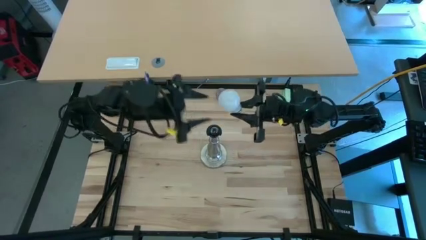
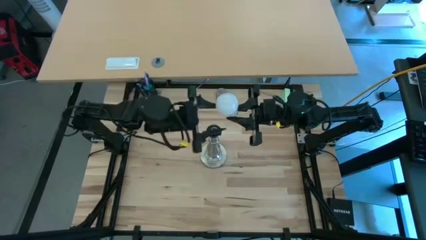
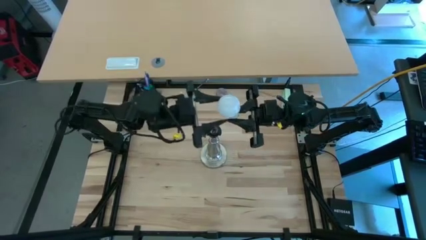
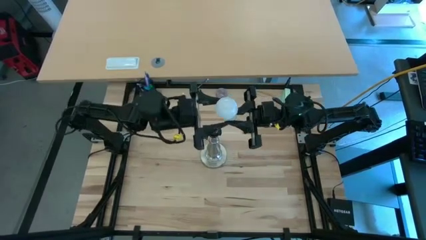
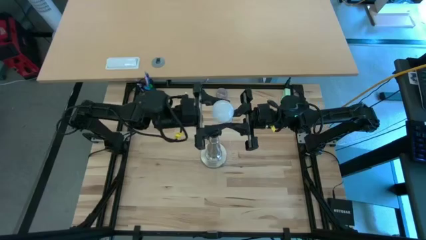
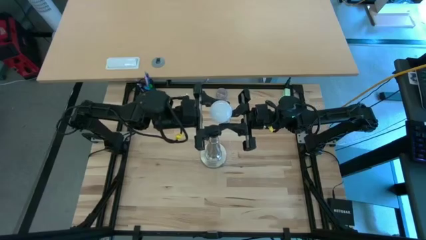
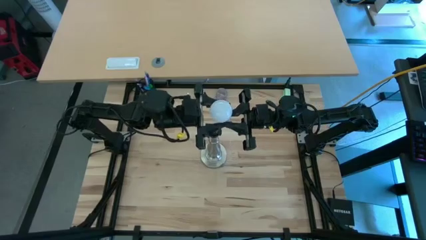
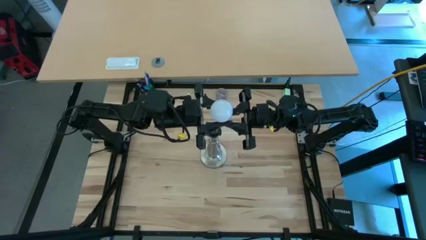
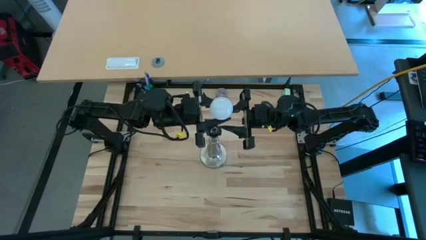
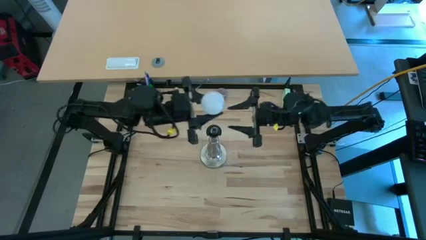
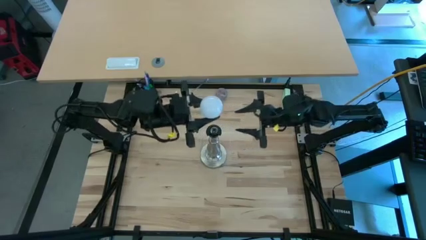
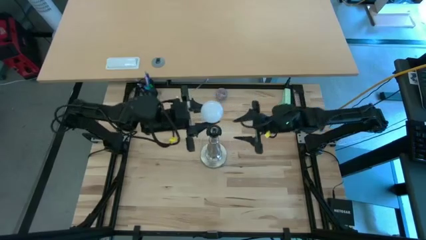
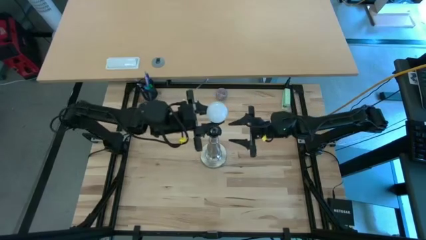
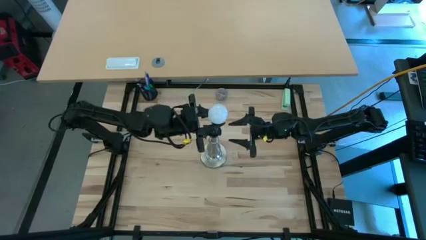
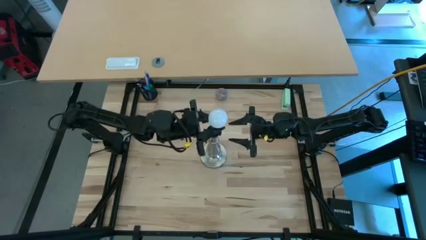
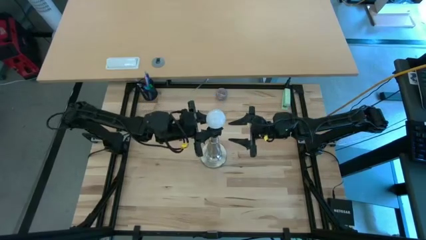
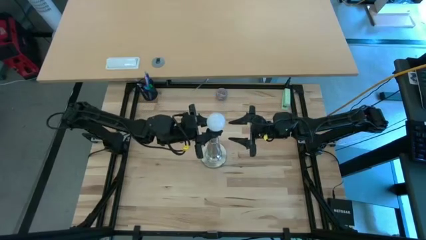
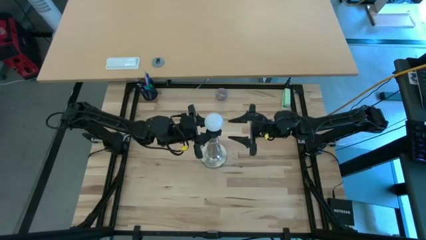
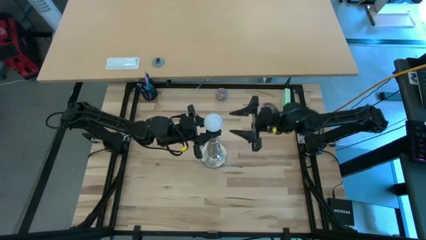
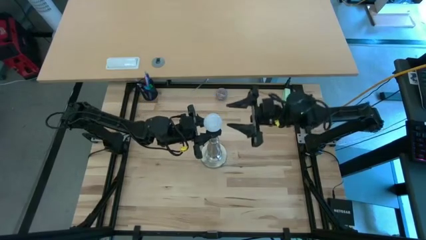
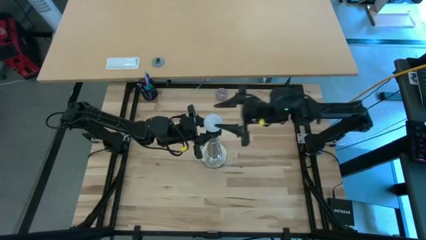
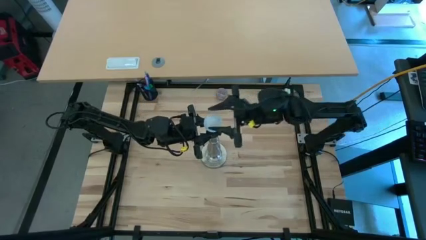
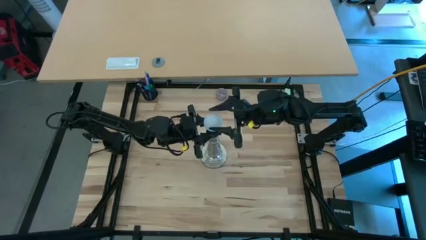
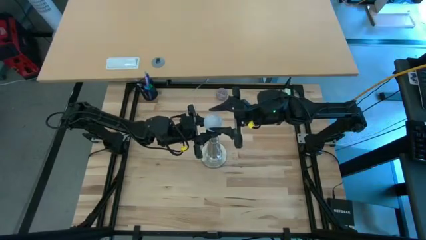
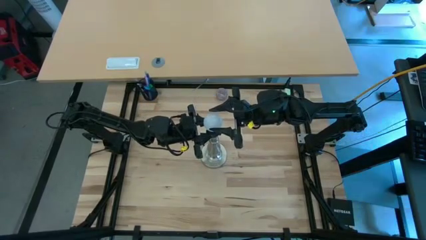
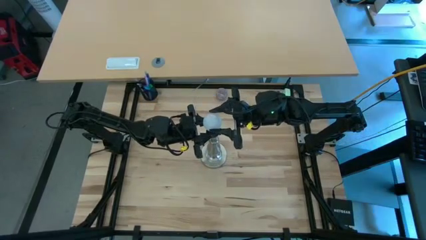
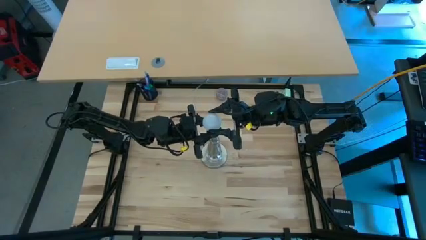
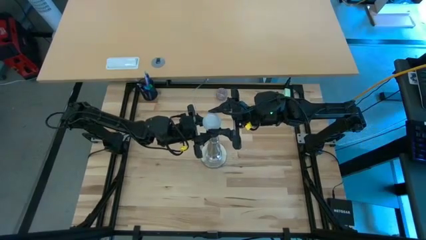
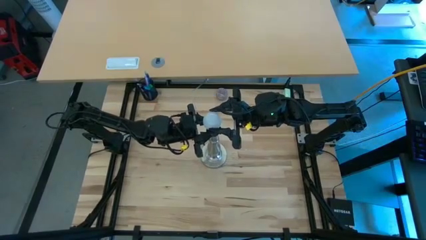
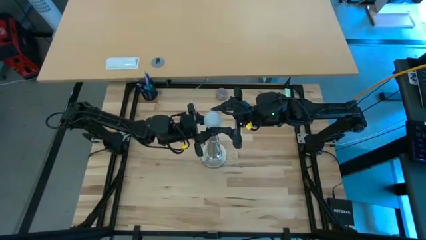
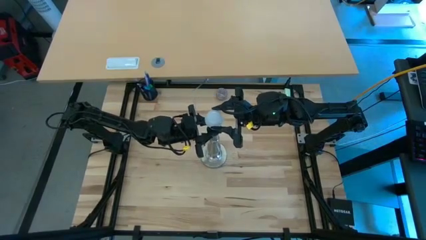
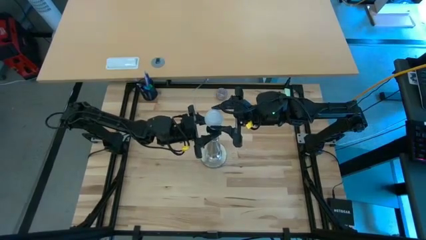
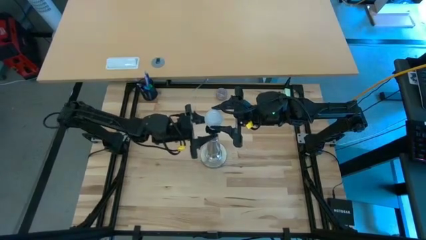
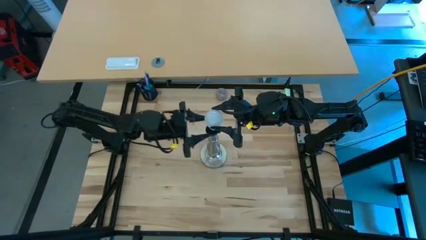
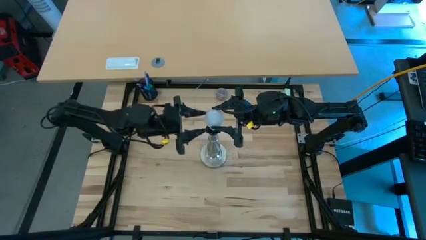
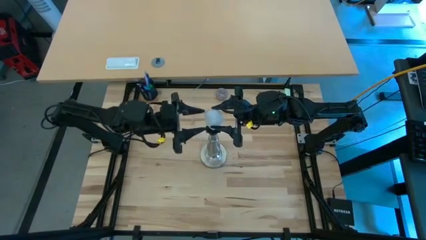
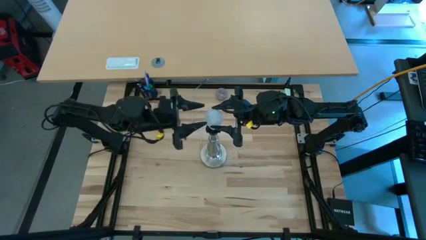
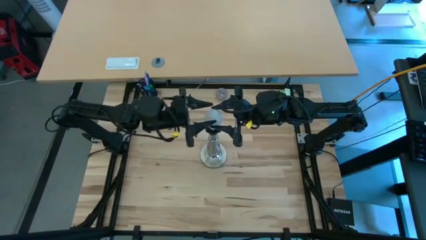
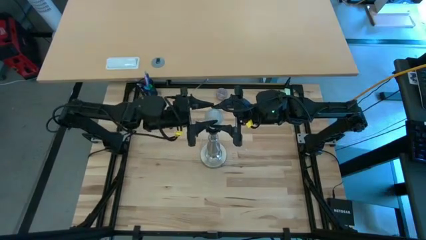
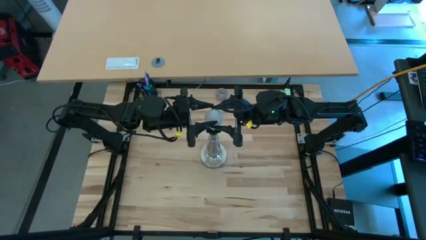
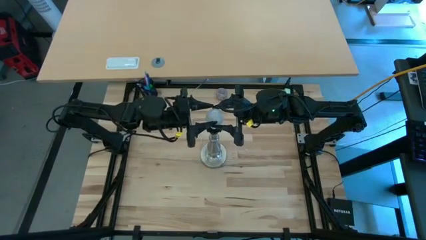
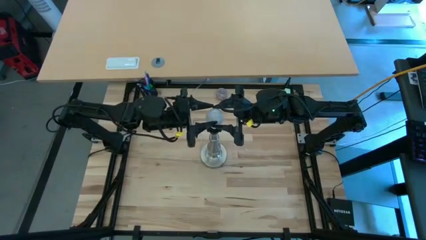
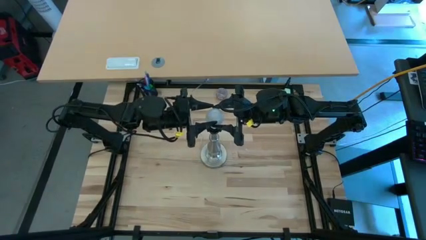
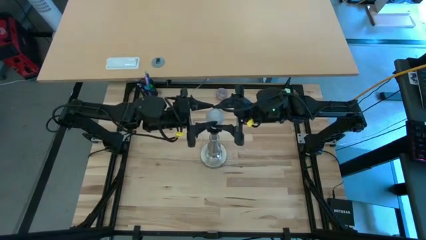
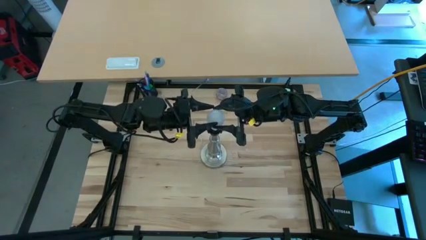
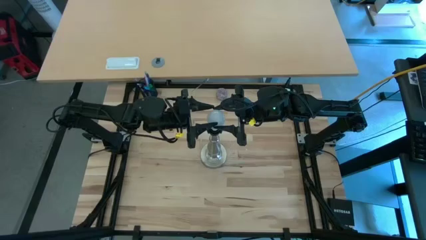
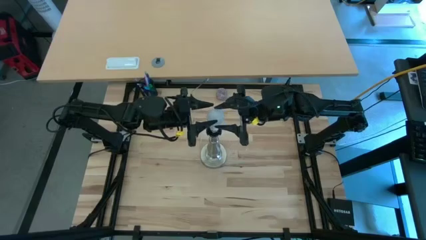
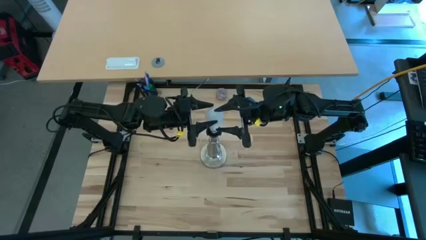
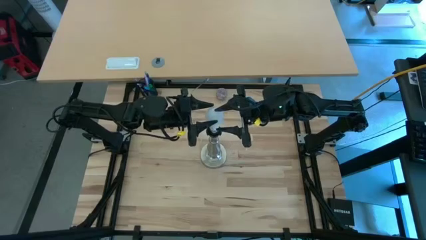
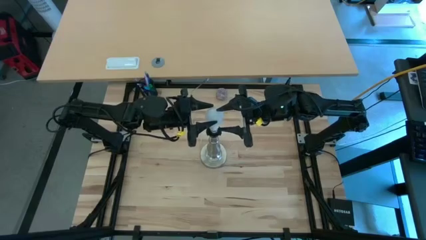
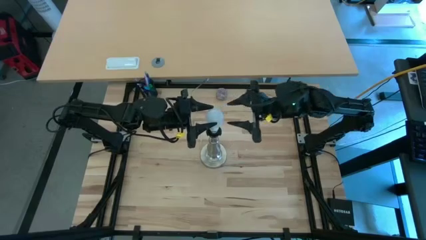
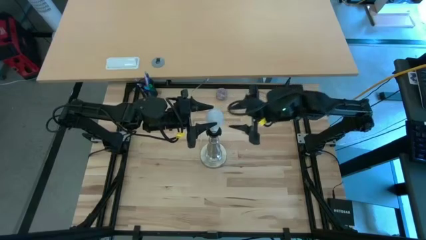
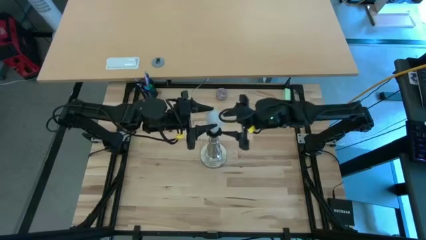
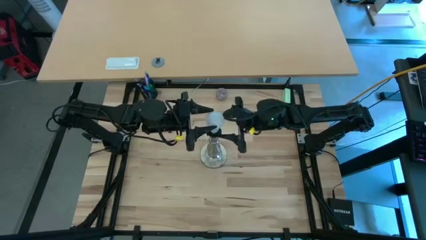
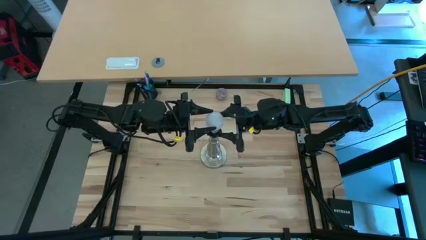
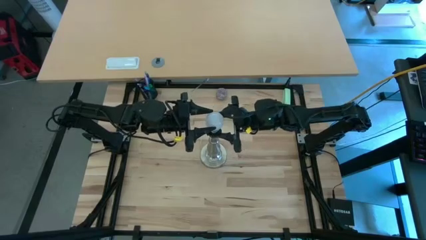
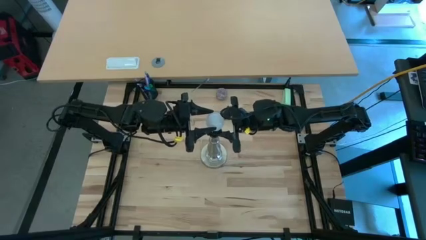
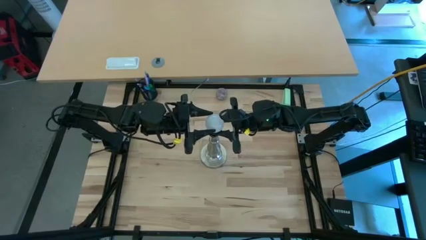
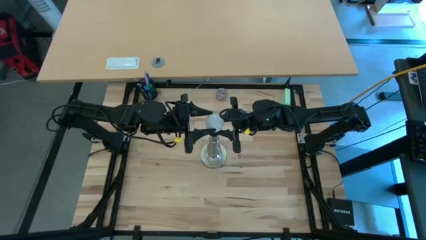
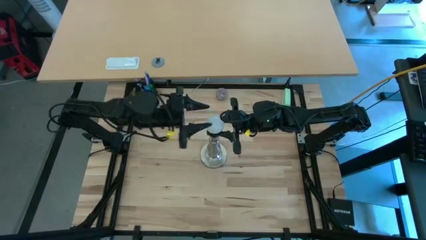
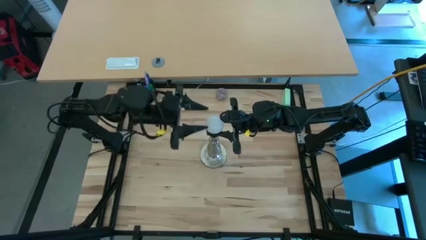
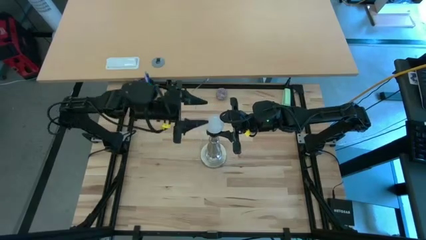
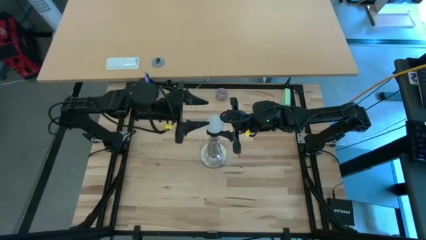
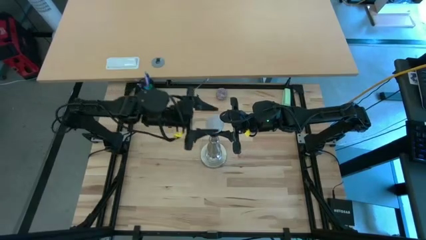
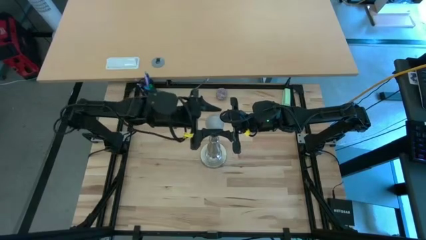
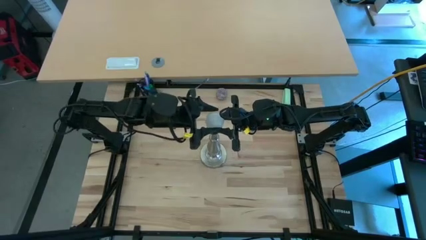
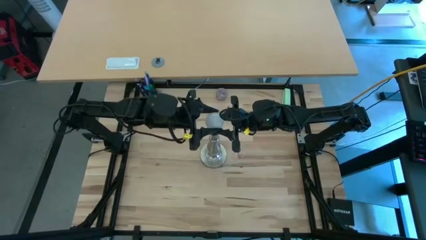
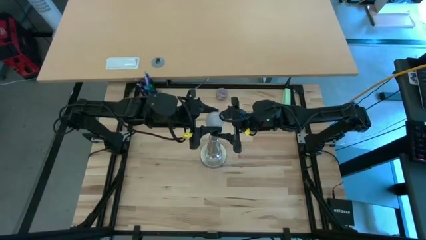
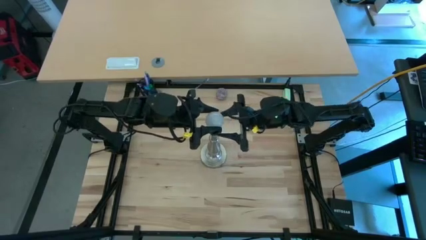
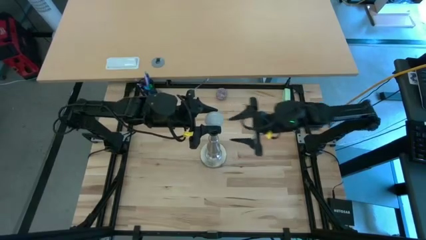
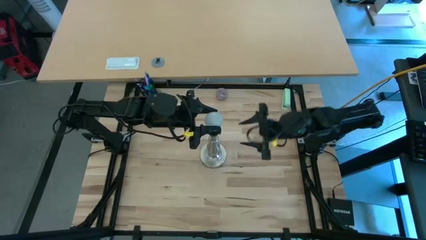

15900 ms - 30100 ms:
Task: Screw lightbulb
Insert the lightbulb into the silver lamp
